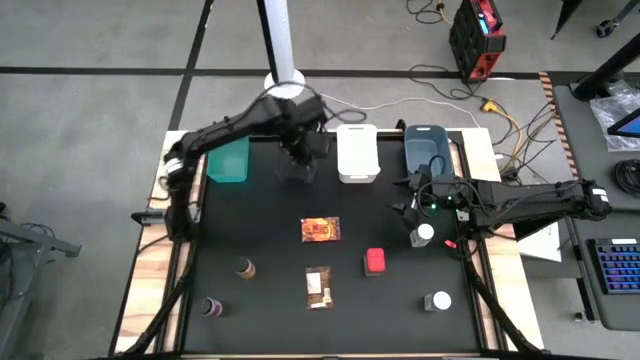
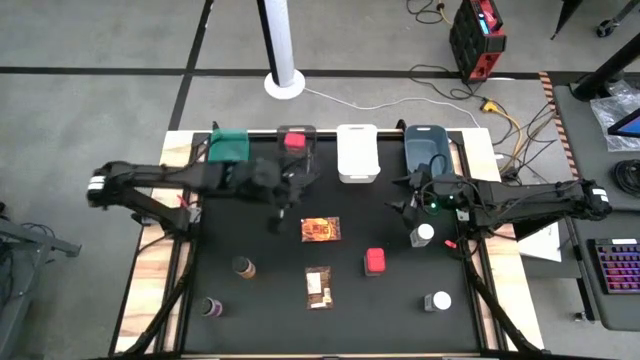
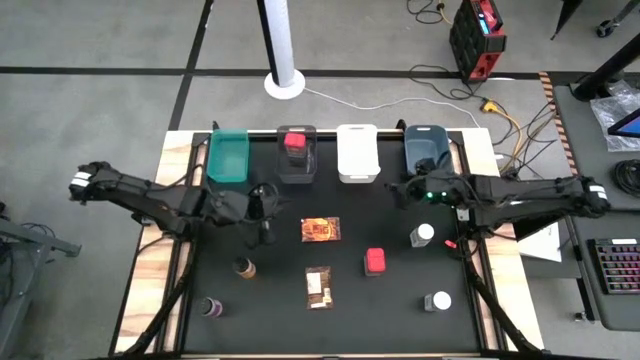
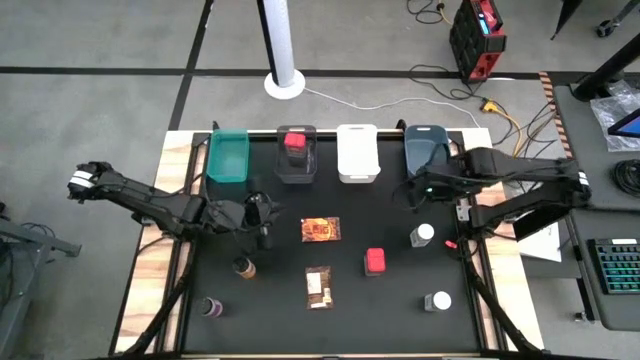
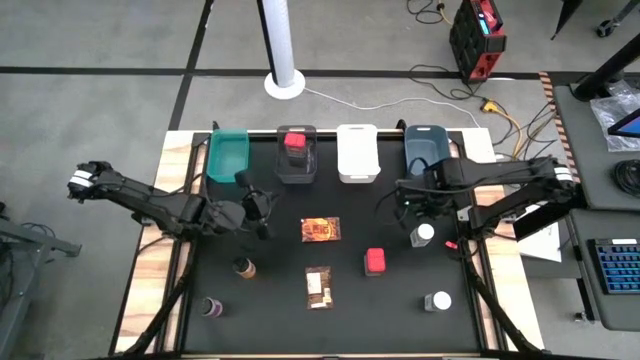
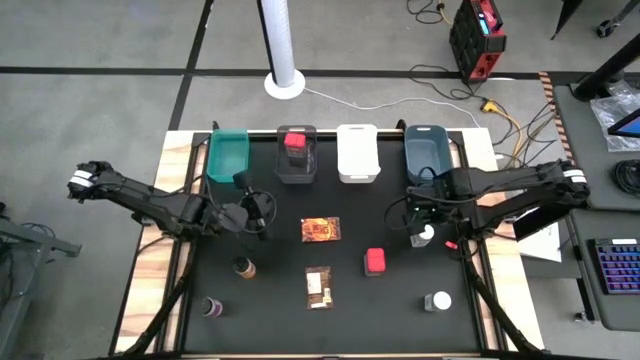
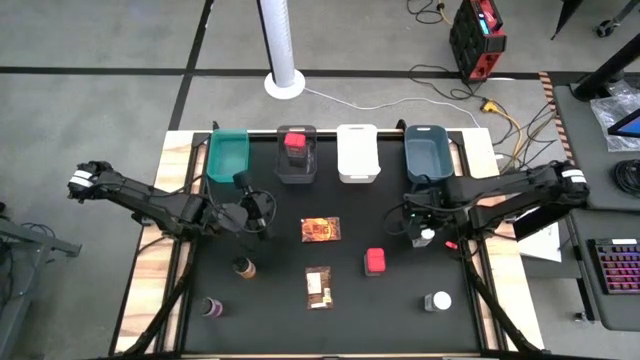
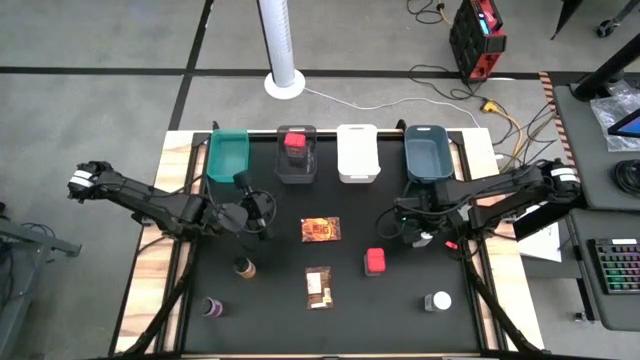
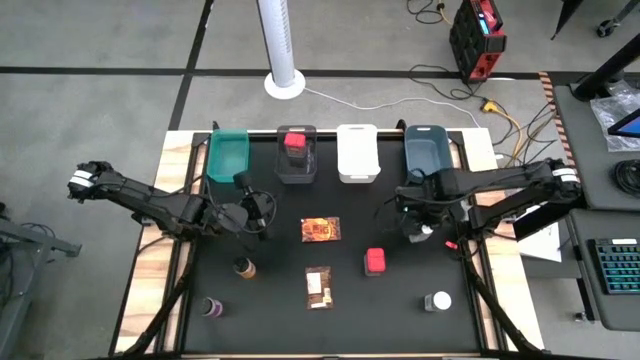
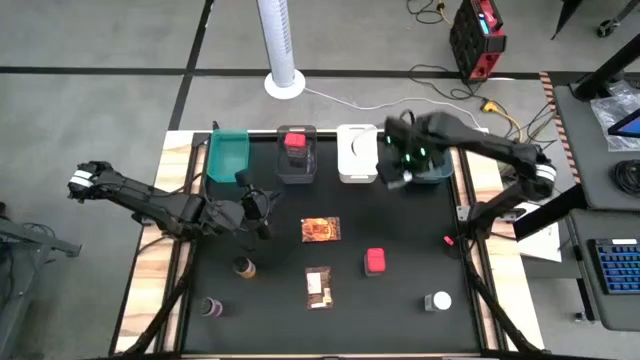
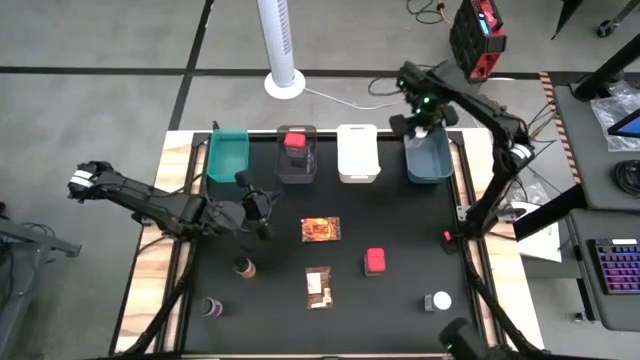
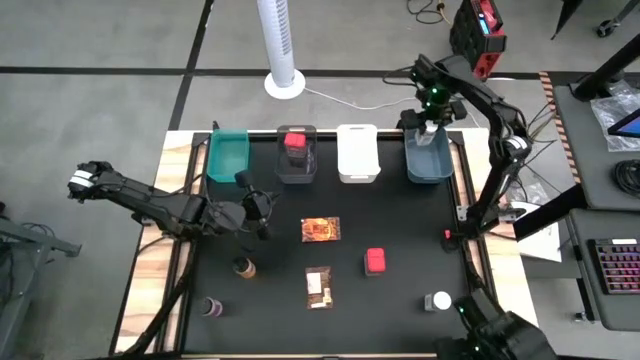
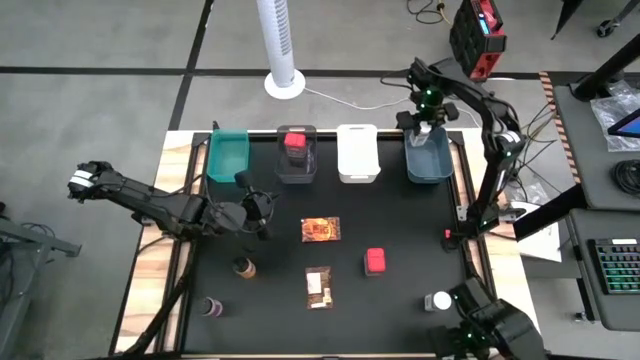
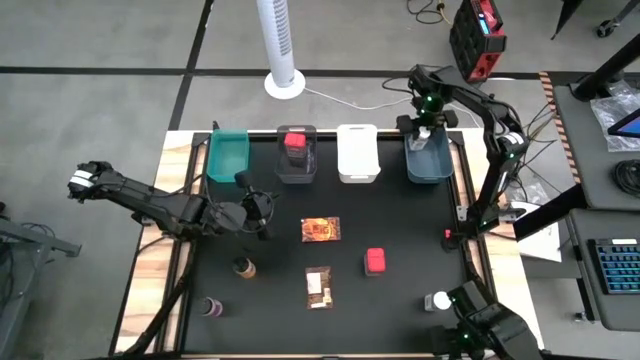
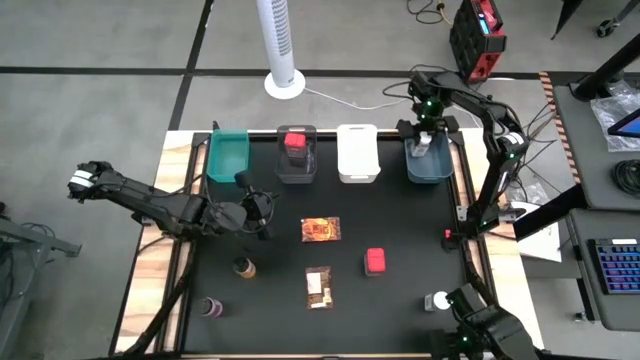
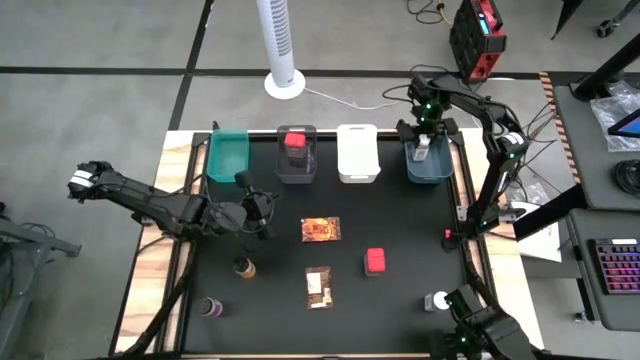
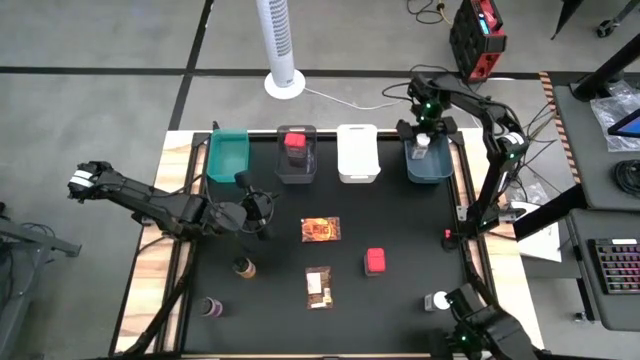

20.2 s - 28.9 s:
Task: Sort spices by type
Put the top white seasoning bottle into the blue bin

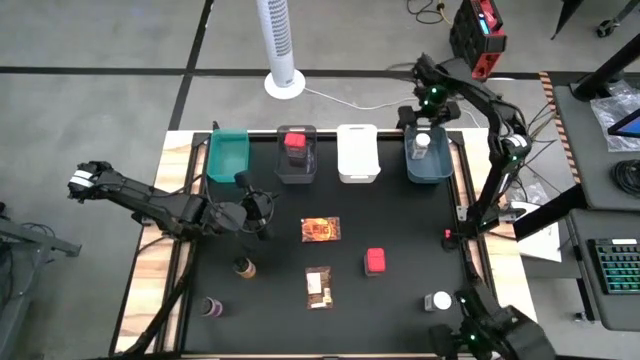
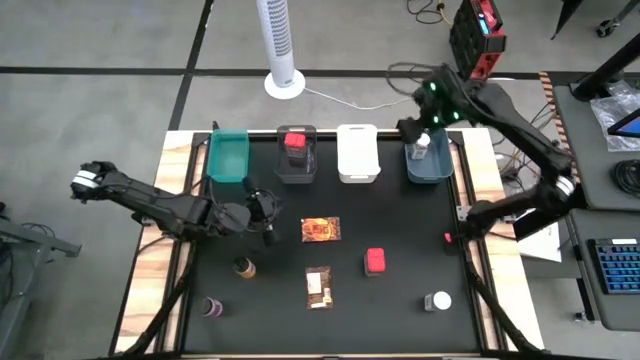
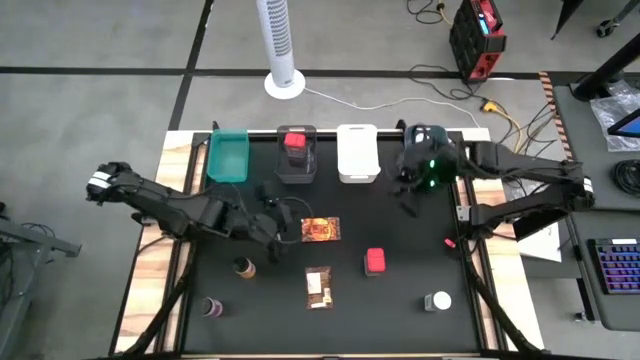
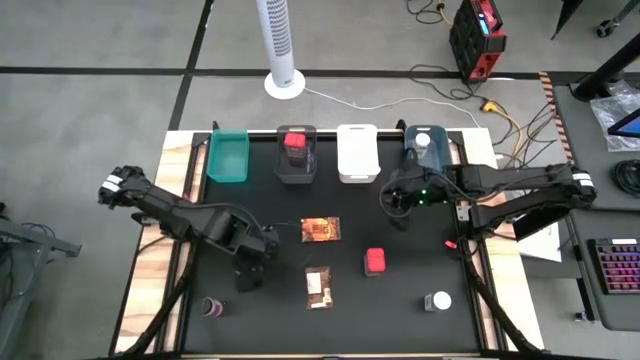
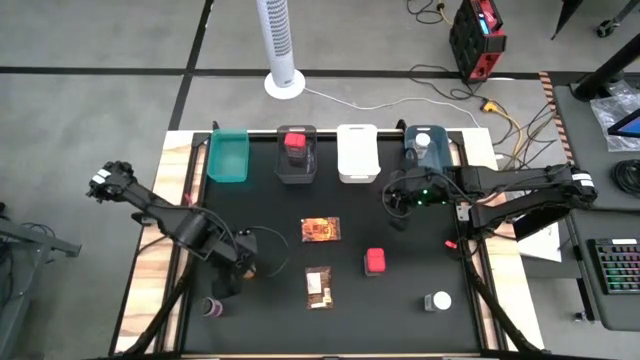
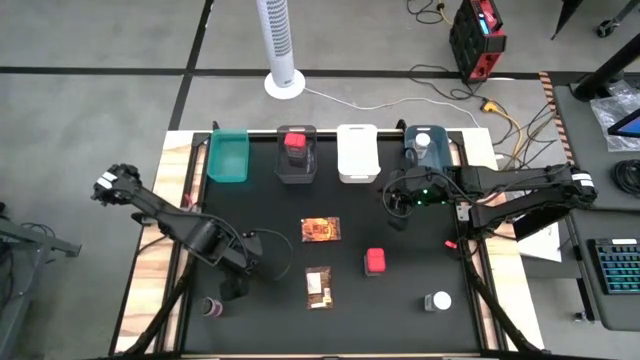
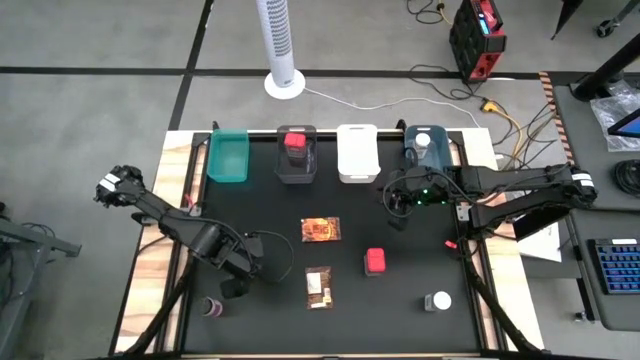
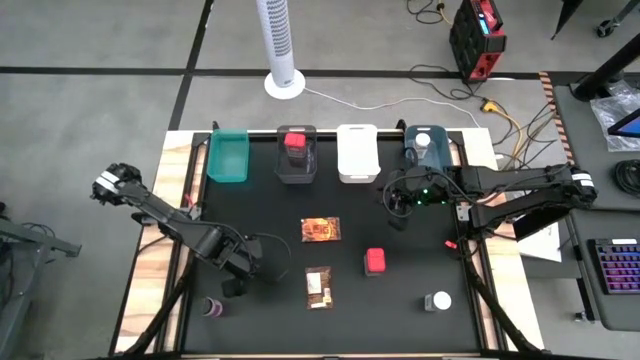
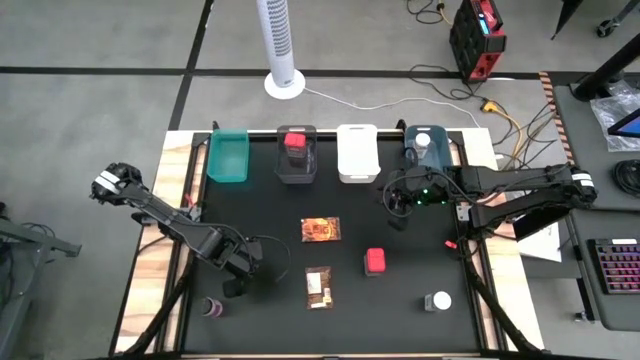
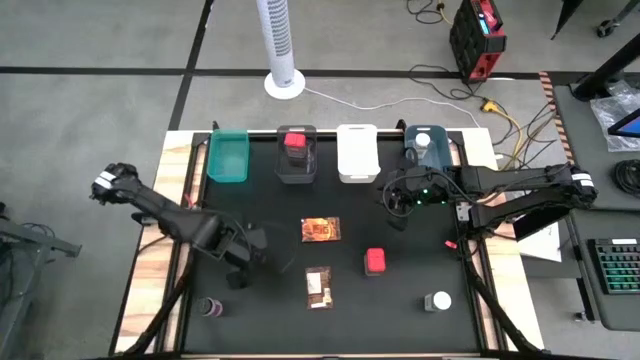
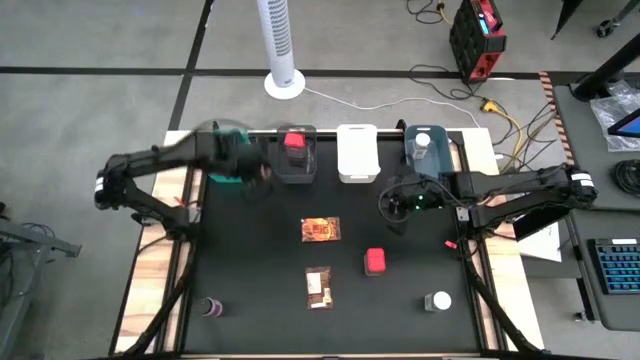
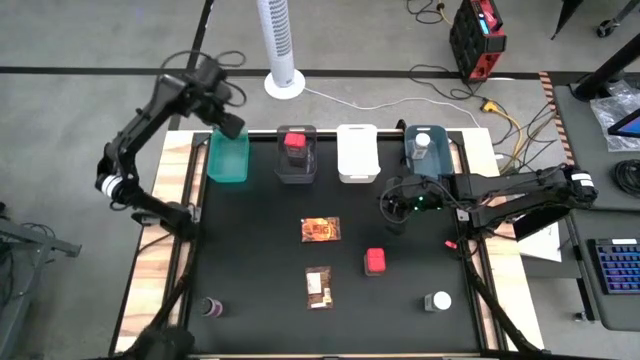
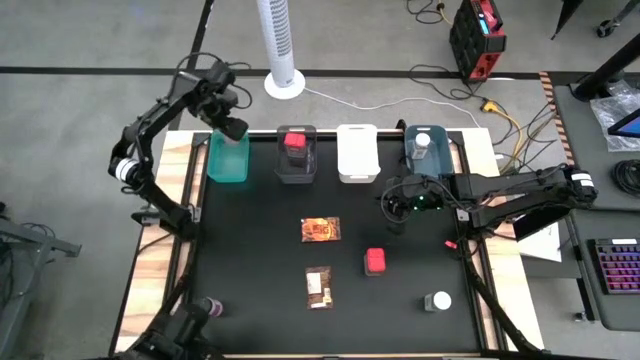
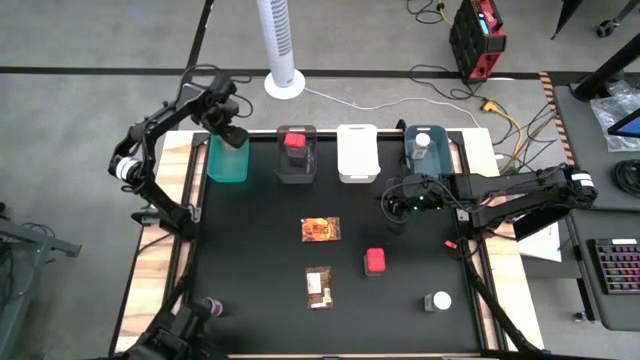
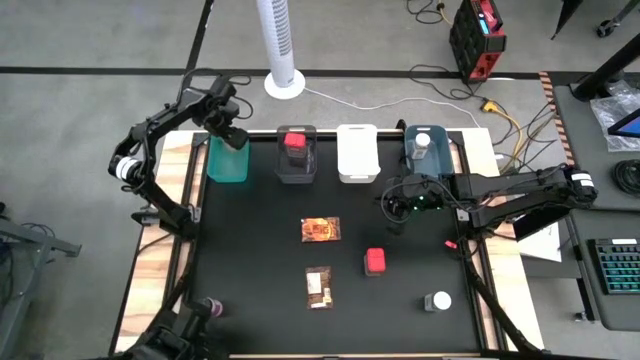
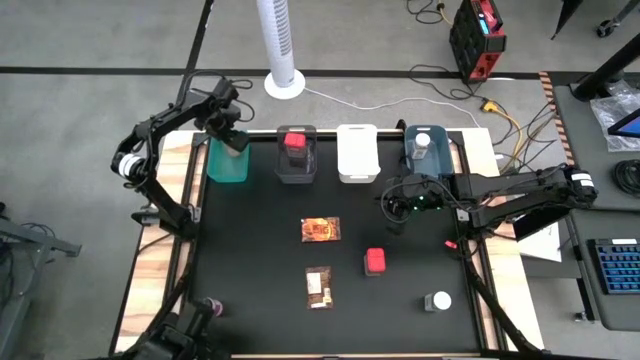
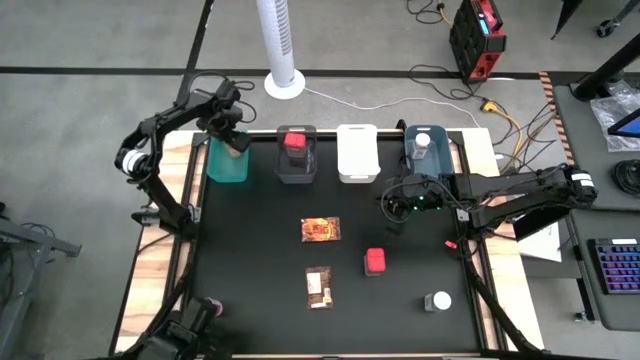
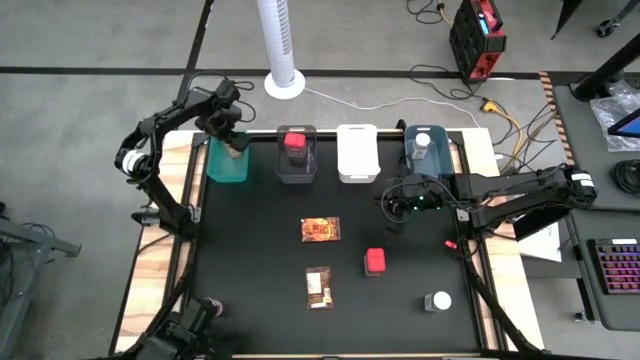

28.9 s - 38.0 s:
Put the top black seasoning bottle into the green bin

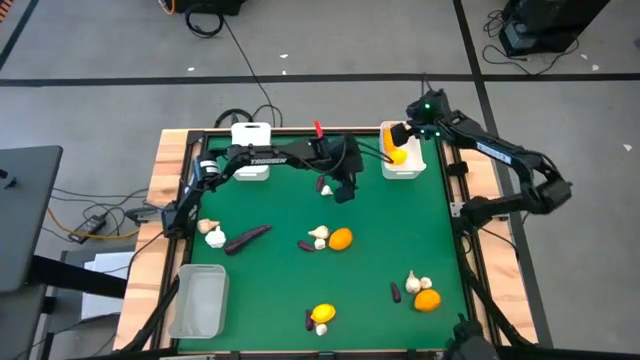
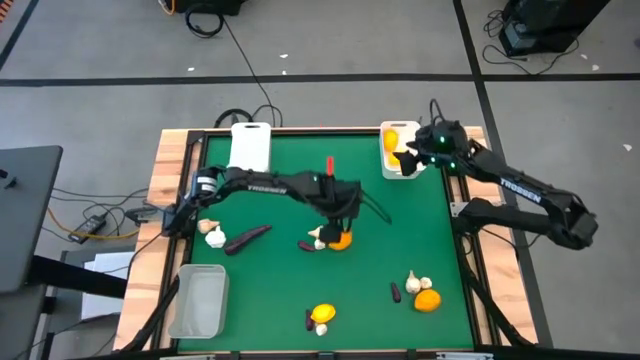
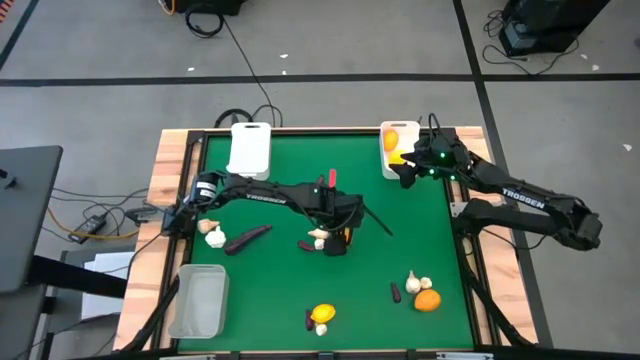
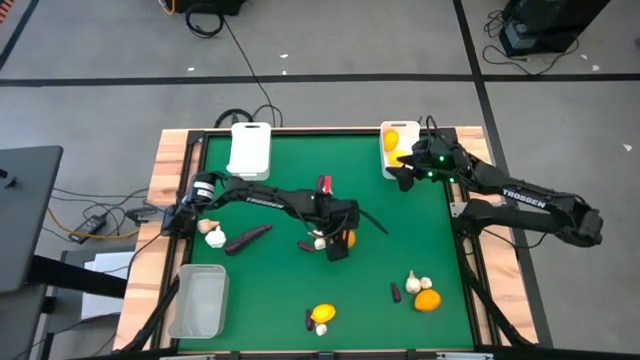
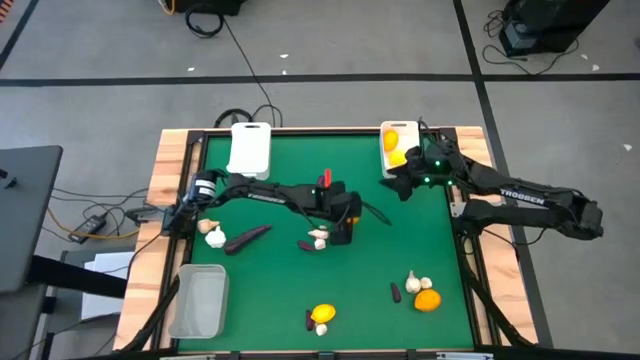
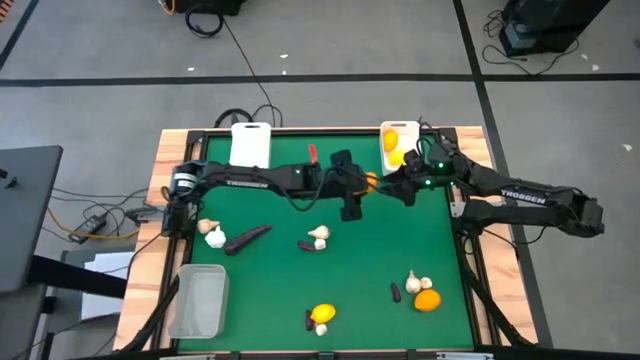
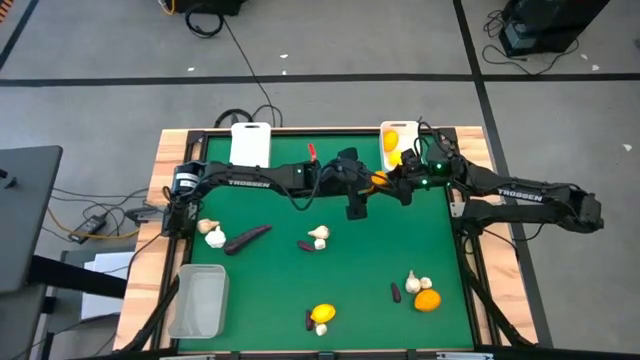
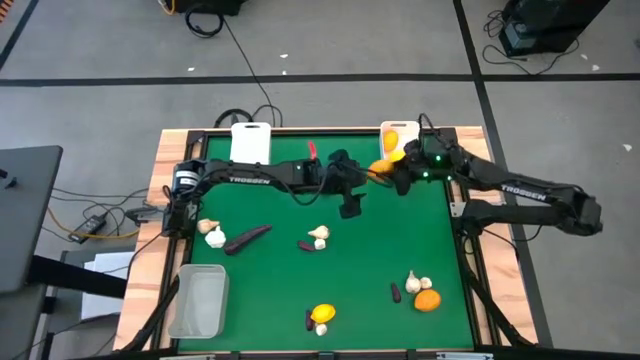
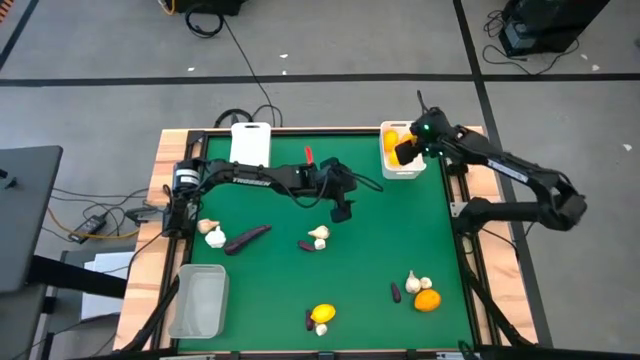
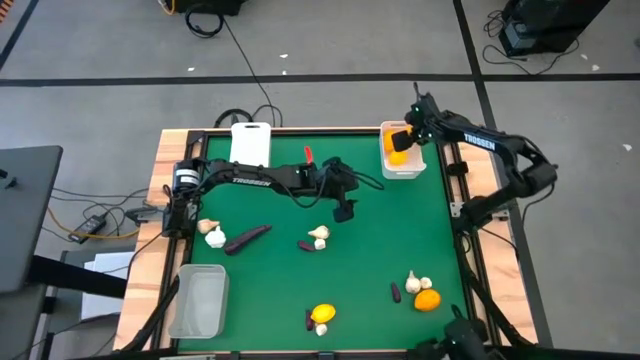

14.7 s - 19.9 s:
Task: Sort produce into baskets
Put the top lemon into the right white bin
